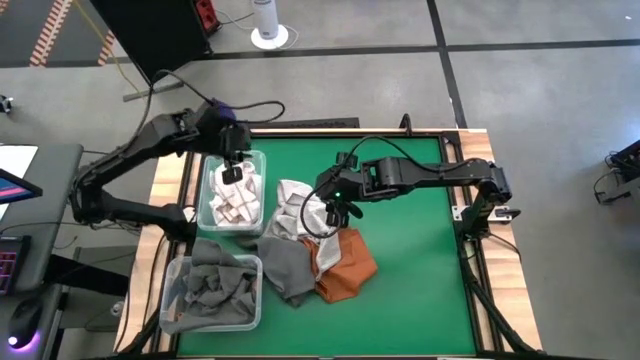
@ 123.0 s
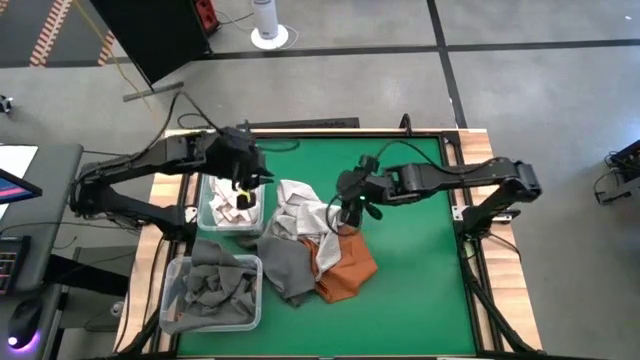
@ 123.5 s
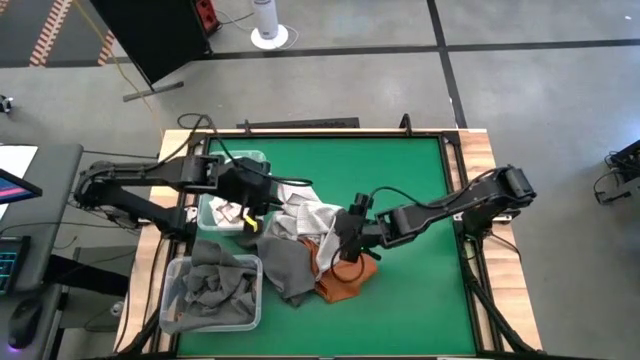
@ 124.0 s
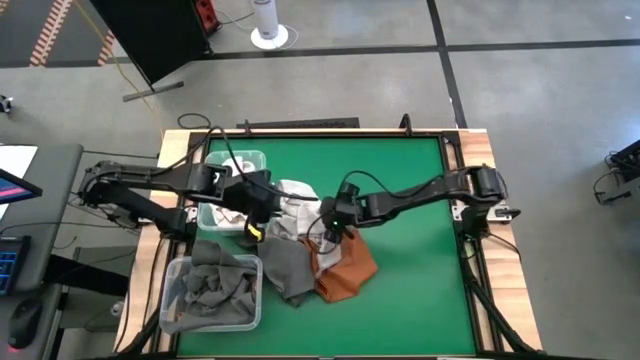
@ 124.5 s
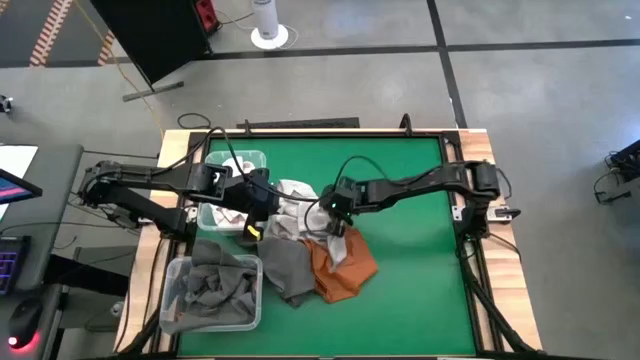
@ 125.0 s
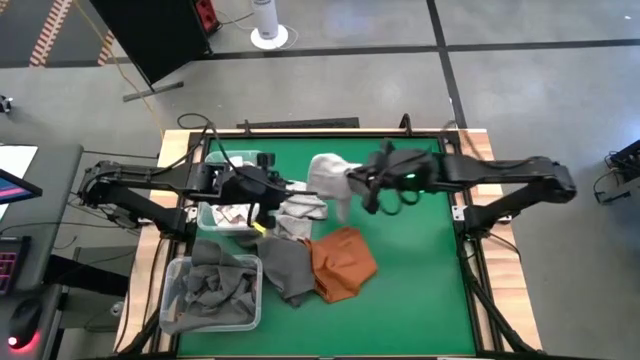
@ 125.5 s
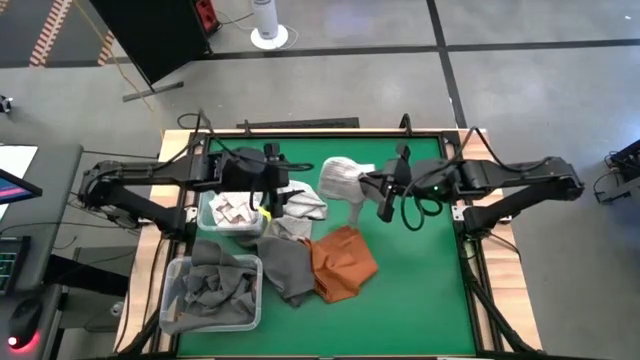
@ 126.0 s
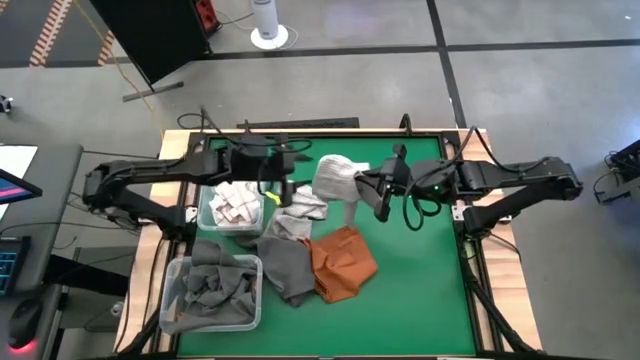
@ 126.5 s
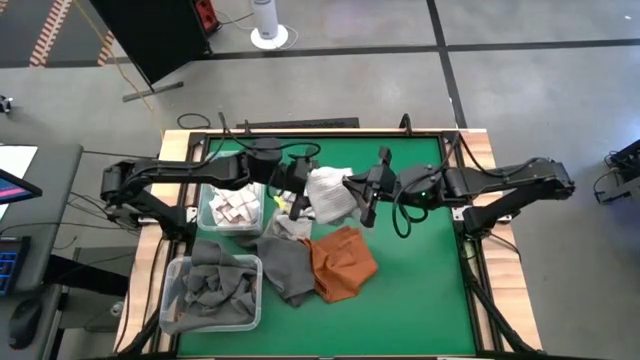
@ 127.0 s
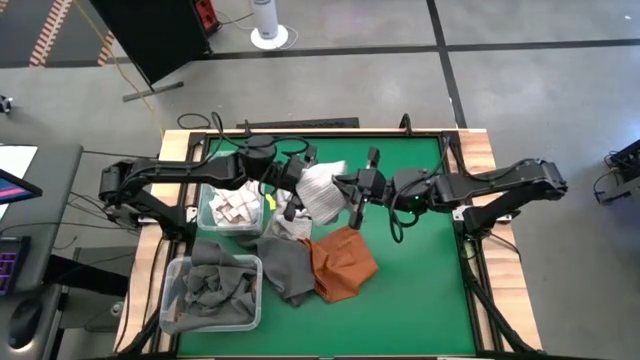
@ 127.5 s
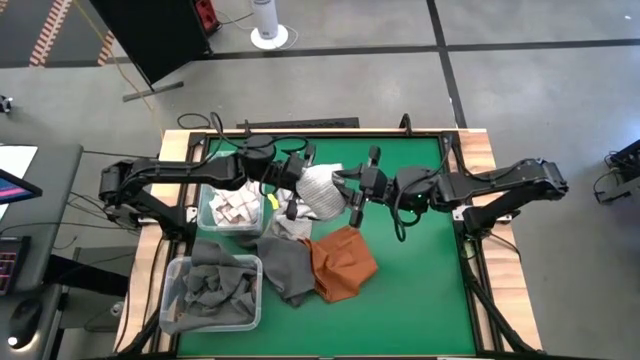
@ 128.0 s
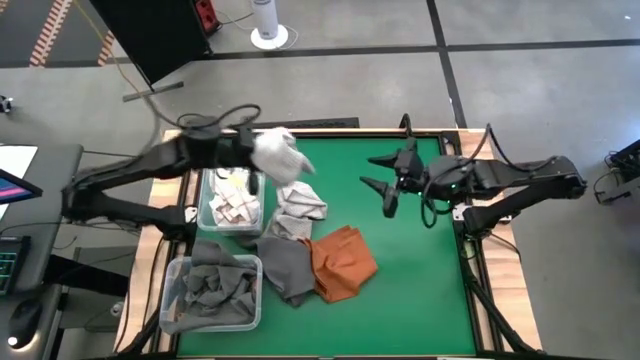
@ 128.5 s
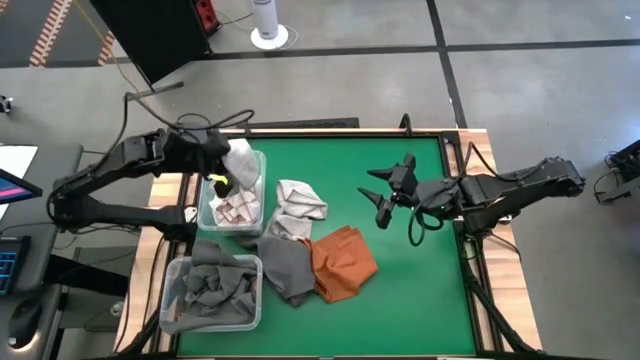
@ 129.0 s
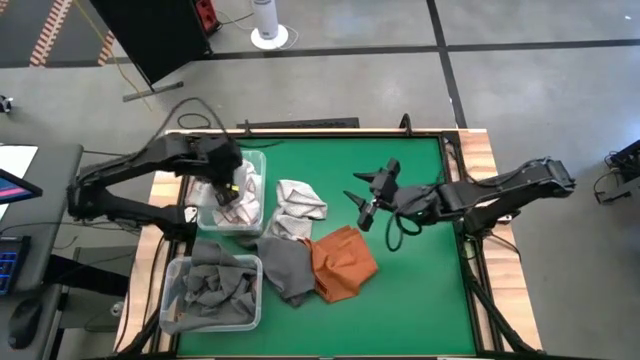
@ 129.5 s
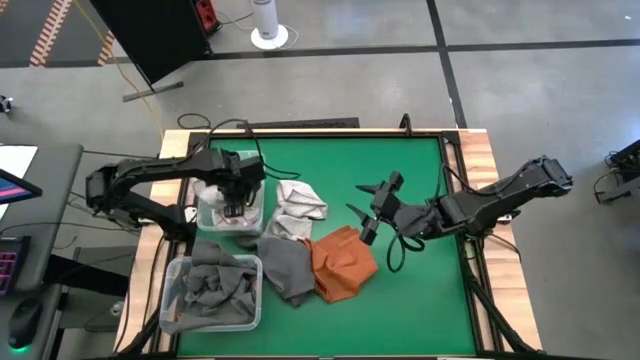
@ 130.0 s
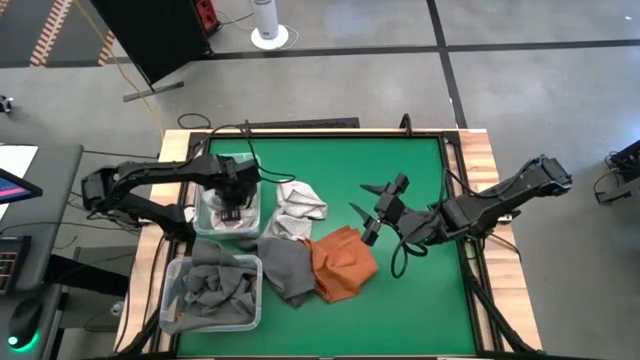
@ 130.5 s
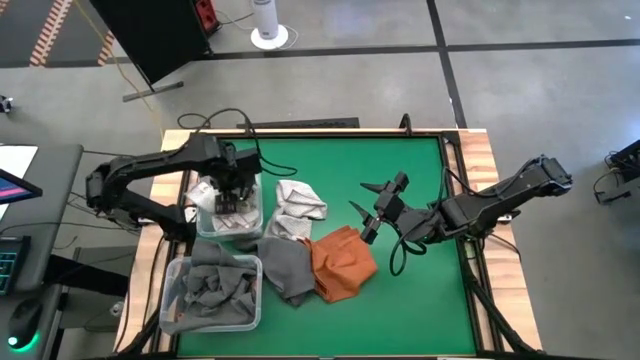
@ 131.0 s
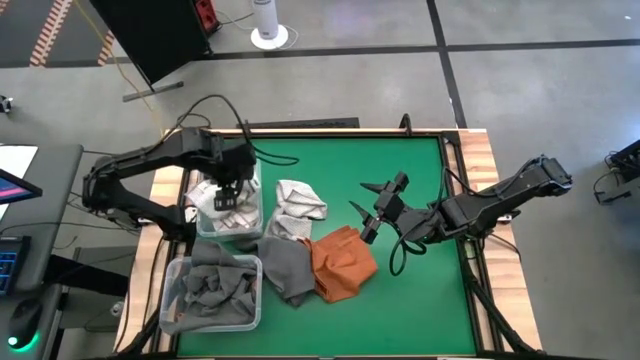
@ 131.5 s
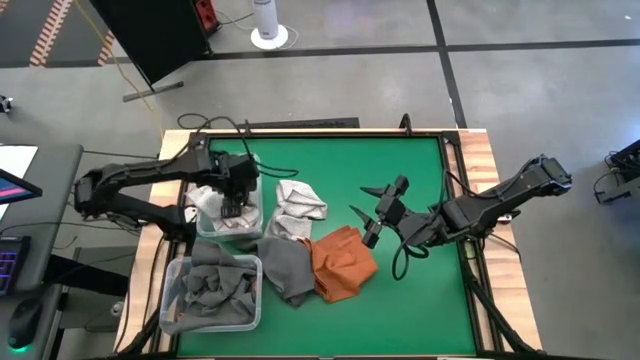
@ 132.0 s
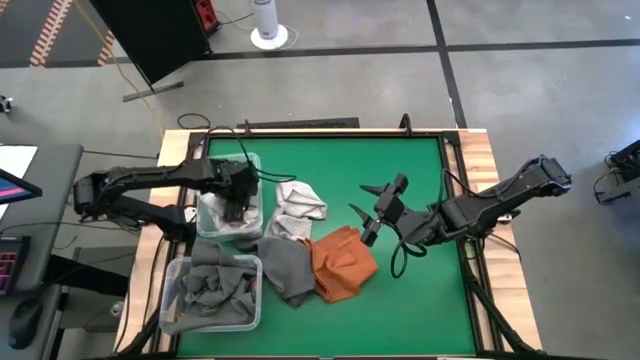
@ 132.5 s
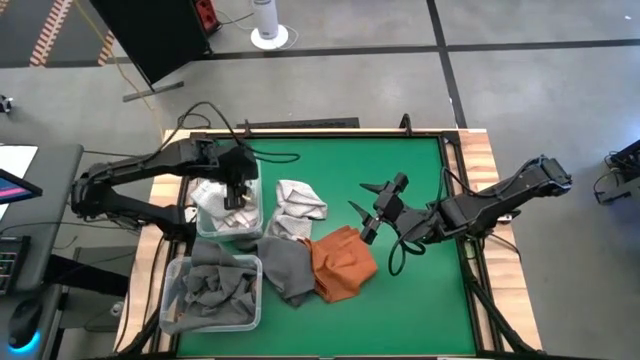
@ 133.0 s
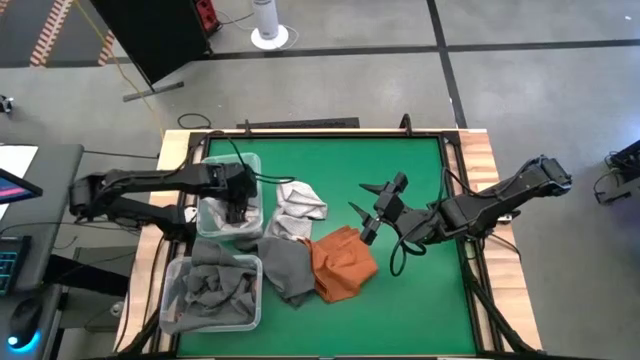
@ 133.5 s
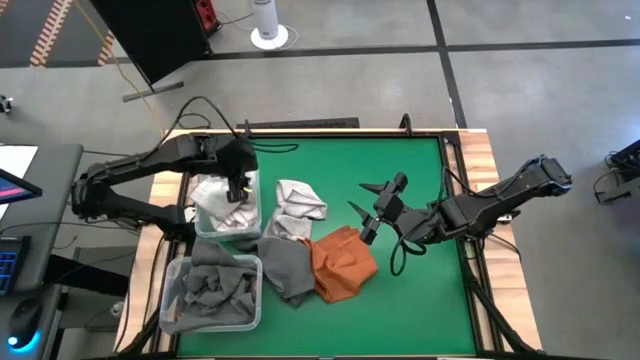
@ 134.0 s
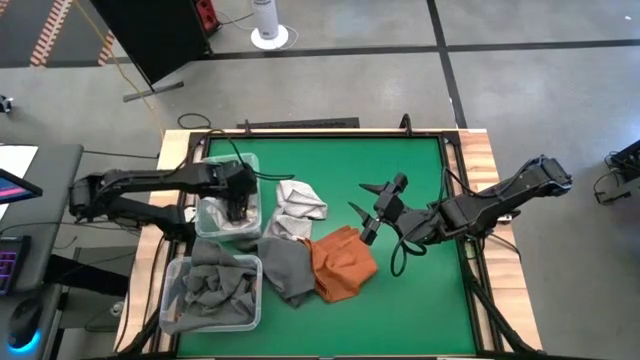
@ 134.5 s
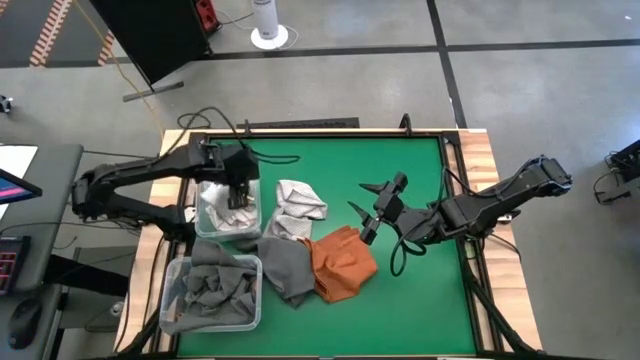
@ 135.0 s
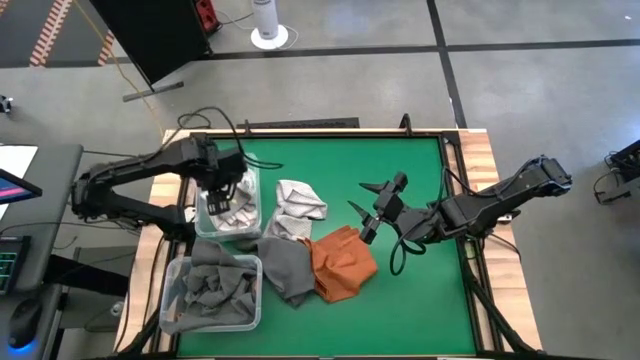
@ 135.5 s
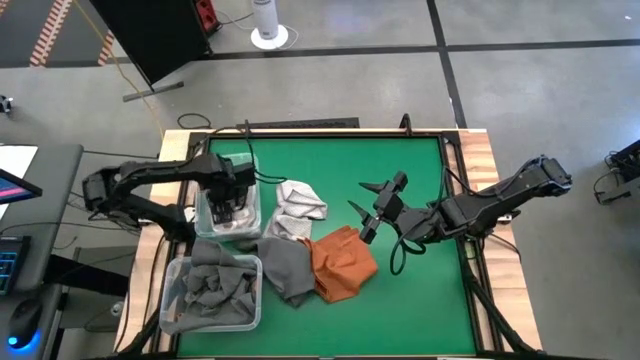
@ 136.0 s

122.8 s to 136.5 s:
Task: Sort towels by color in basket
Put the dark white towel into the top transparent bin

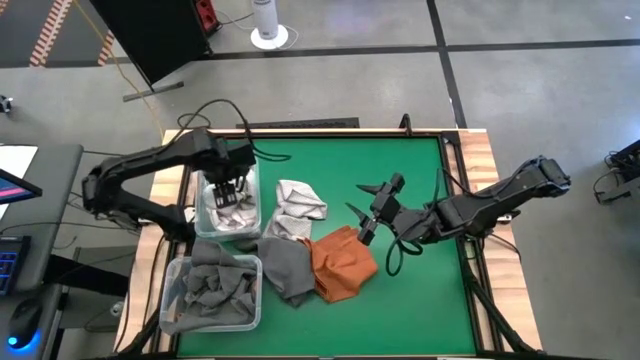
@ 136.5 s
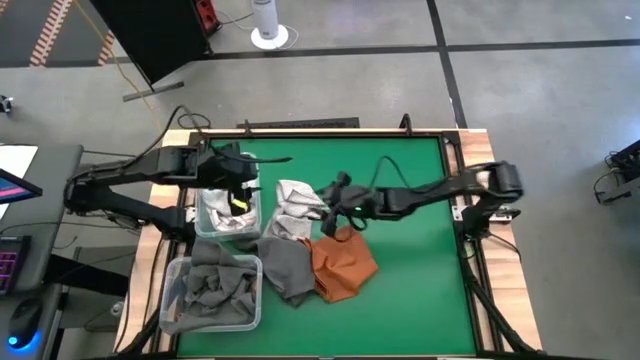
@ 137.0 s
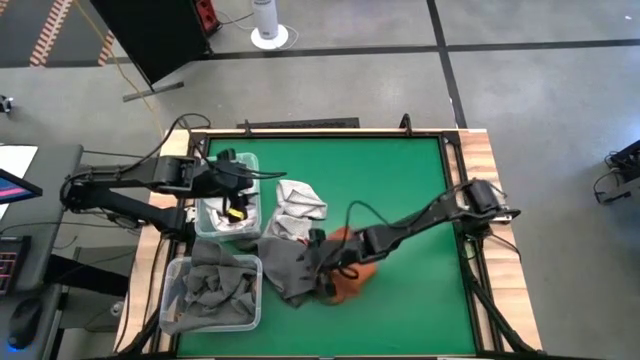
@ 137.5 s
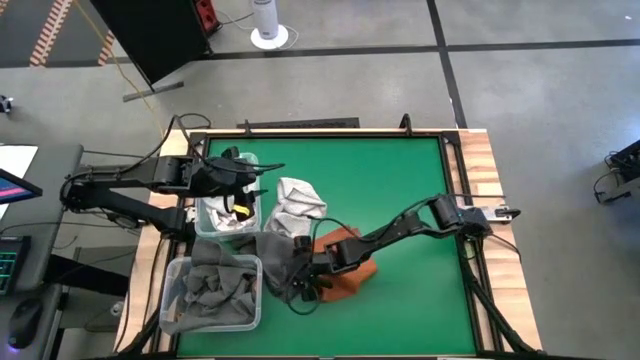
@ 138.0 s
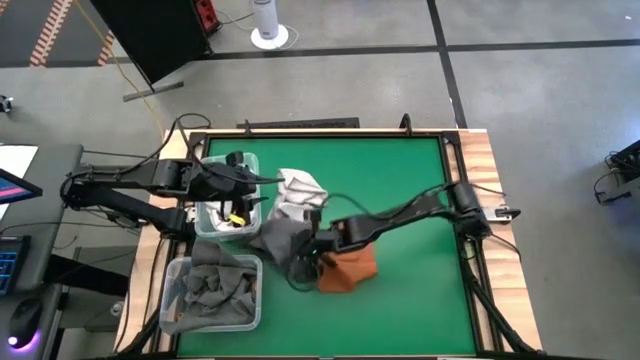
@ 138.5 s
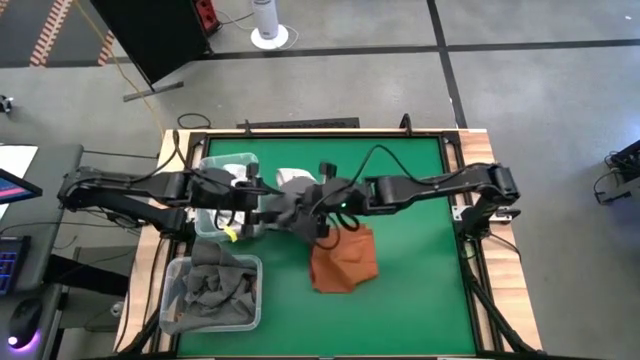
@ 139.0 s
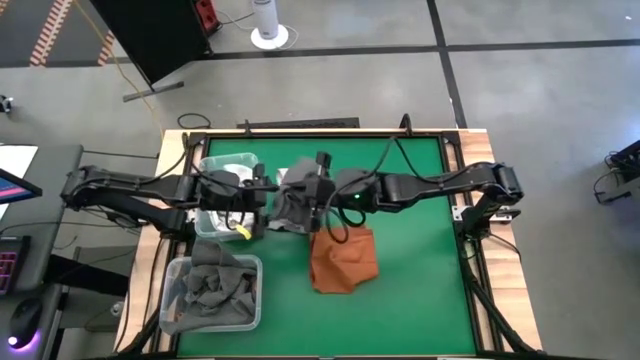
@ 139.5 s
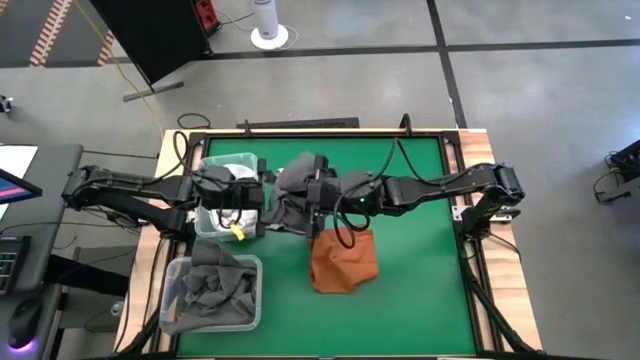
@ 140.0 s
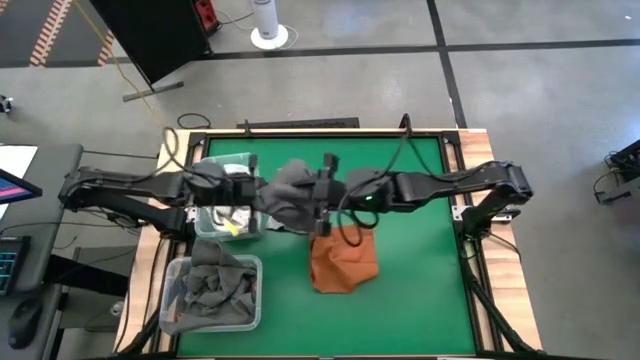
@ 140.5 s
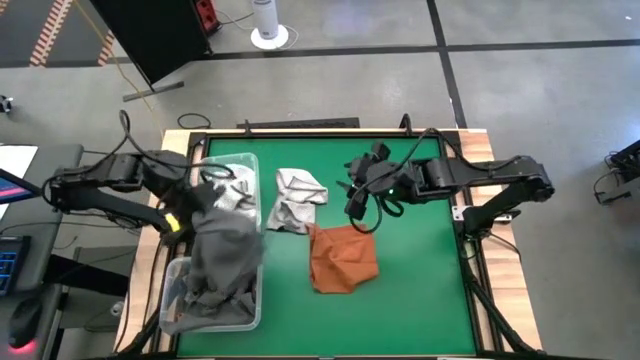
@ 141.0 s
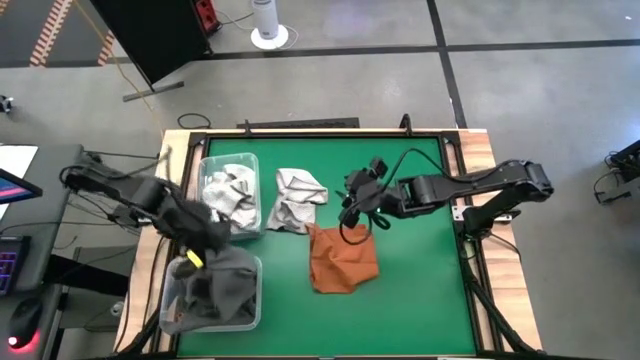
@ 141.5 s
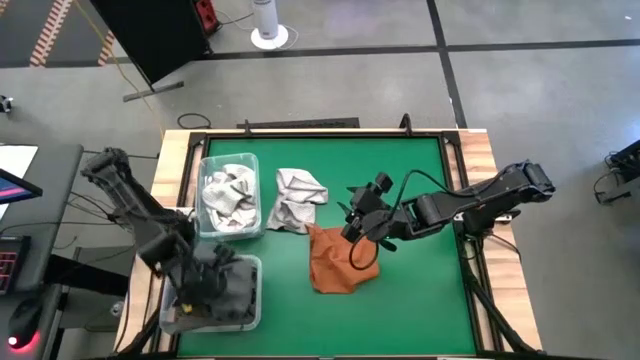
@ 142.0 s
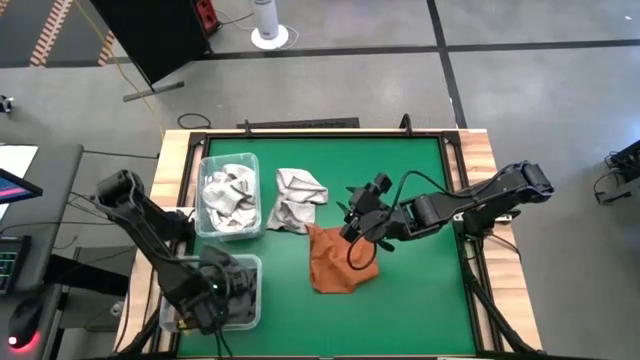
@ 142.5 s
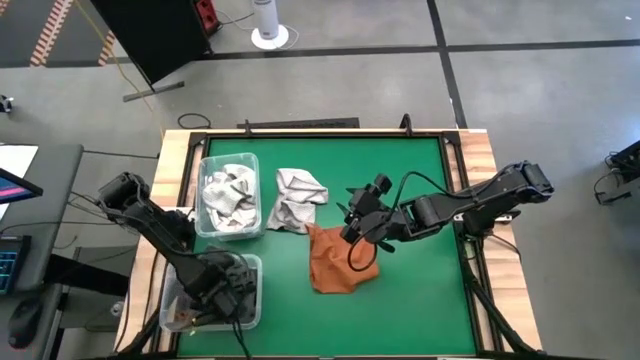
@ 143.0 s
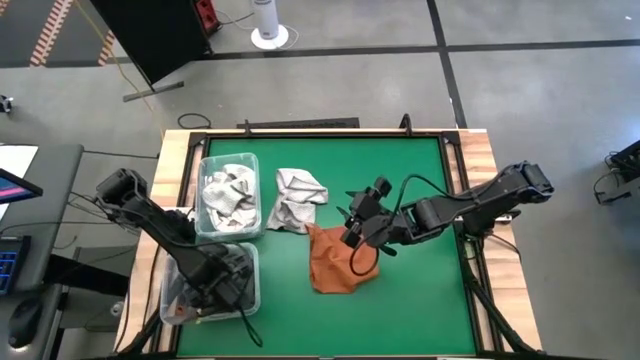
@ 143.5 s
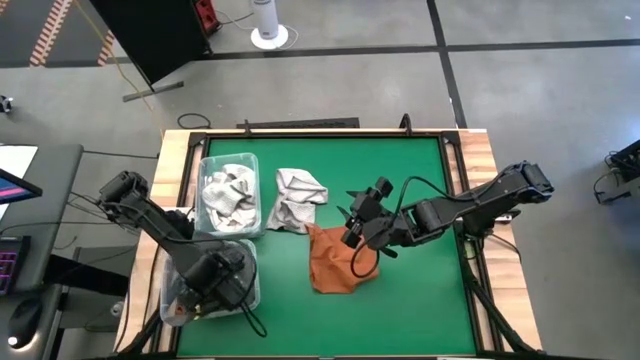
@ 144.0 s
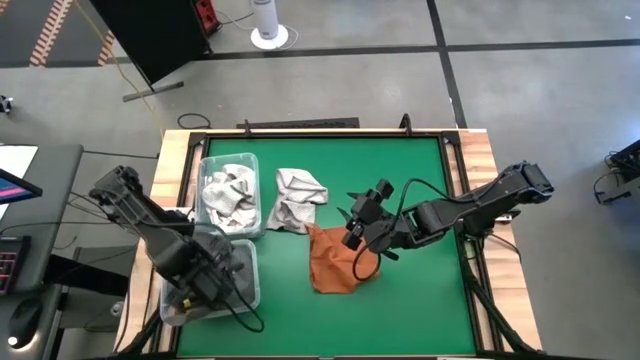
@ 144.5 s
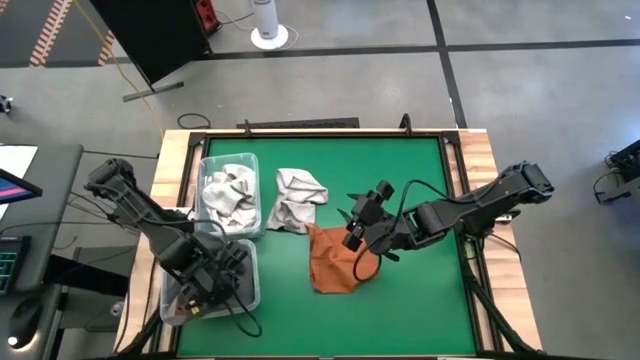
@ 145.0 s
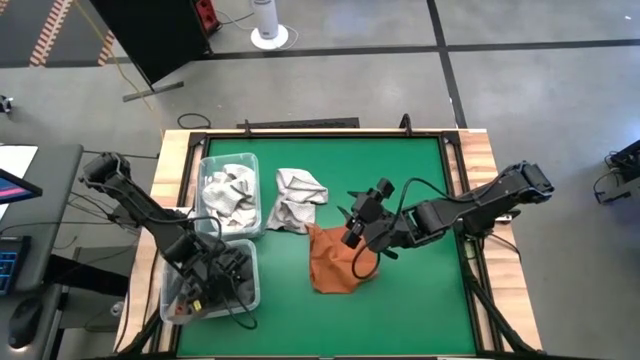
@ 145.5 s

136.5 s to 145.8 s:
Put the gray towel into the bottom transparent bin
